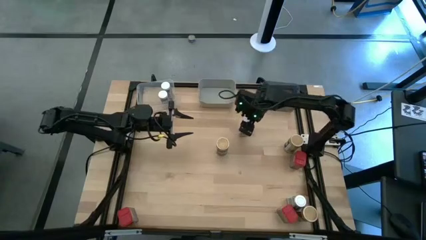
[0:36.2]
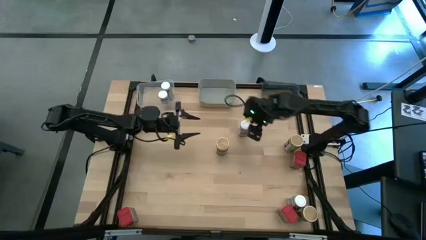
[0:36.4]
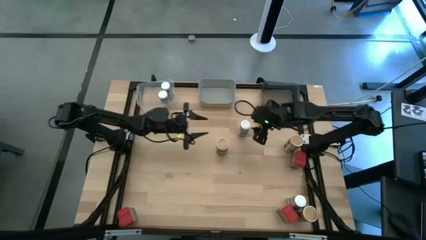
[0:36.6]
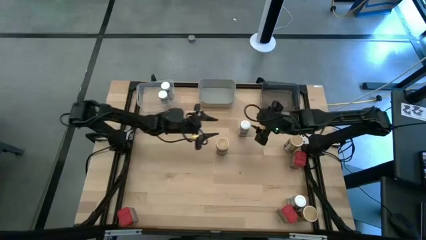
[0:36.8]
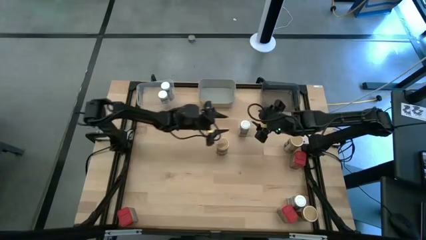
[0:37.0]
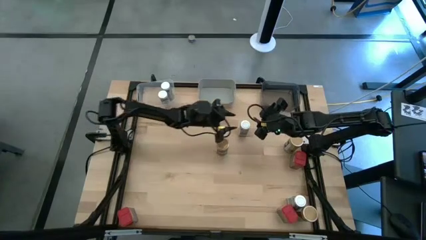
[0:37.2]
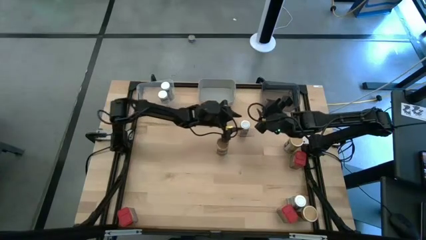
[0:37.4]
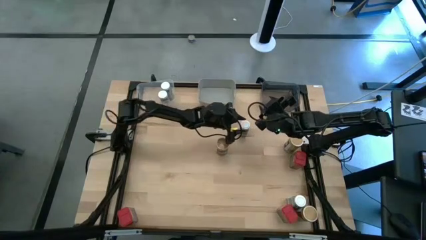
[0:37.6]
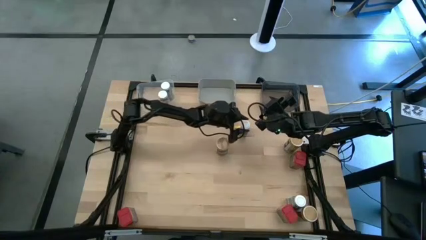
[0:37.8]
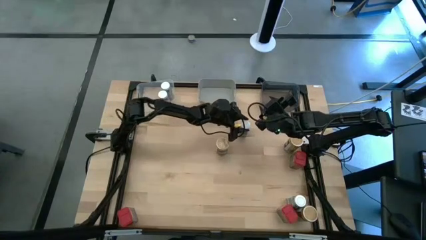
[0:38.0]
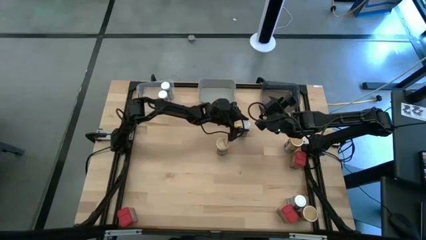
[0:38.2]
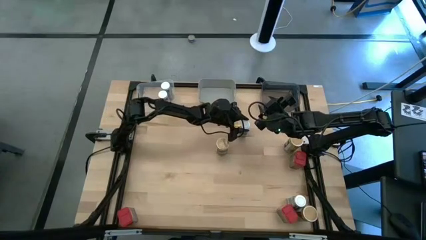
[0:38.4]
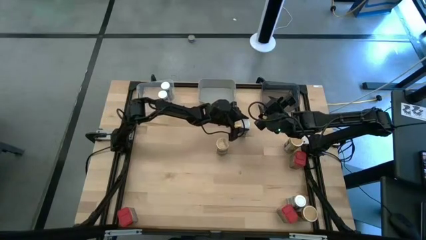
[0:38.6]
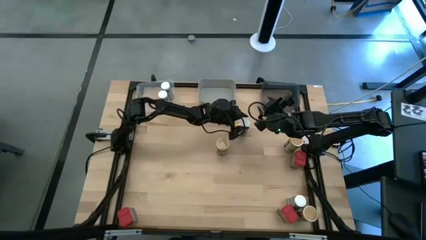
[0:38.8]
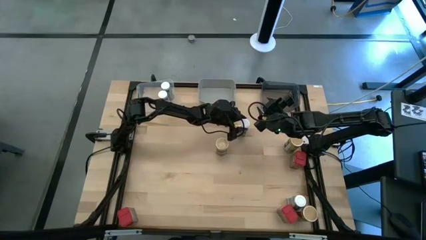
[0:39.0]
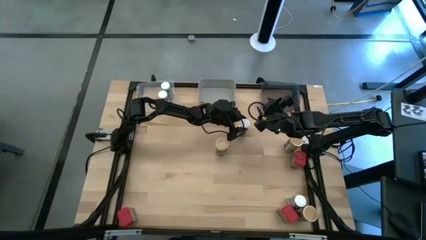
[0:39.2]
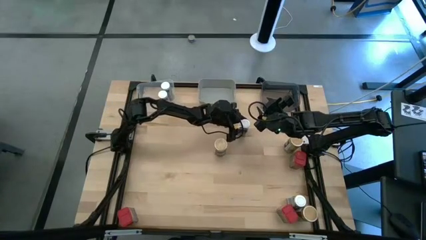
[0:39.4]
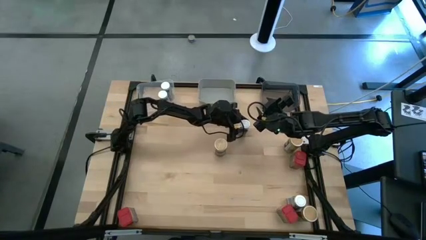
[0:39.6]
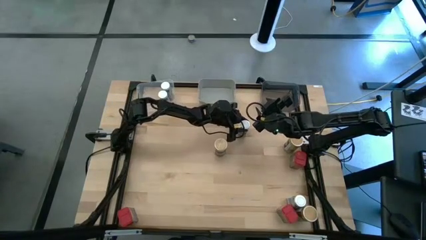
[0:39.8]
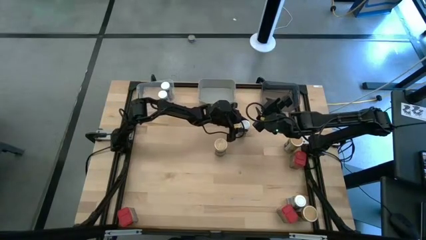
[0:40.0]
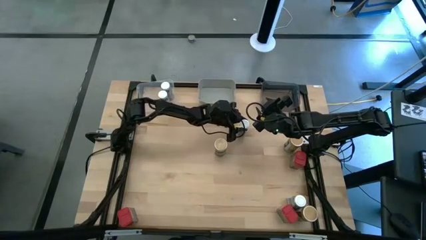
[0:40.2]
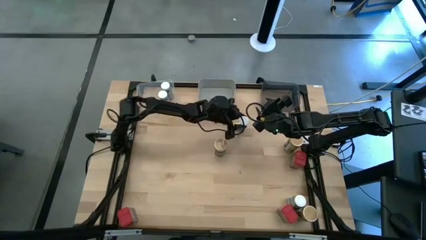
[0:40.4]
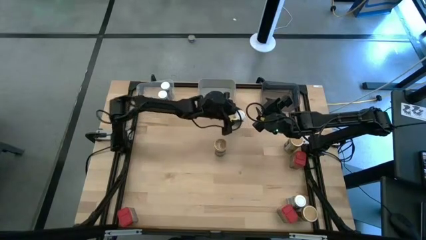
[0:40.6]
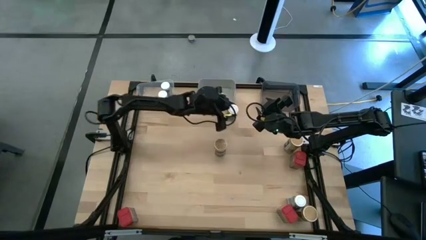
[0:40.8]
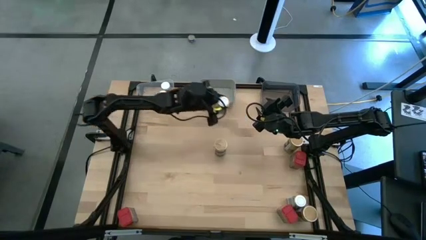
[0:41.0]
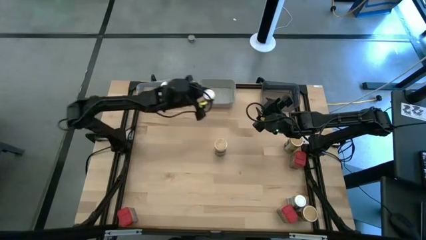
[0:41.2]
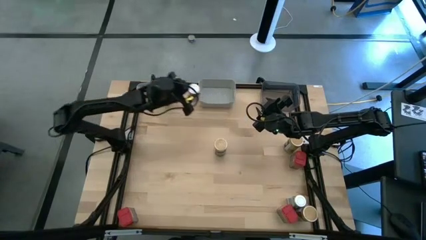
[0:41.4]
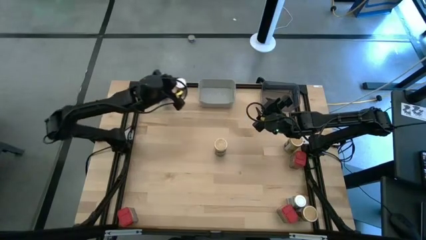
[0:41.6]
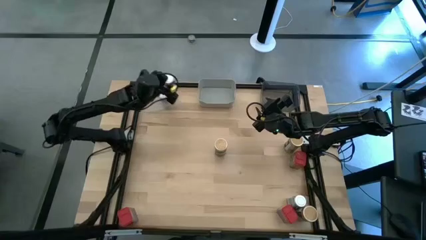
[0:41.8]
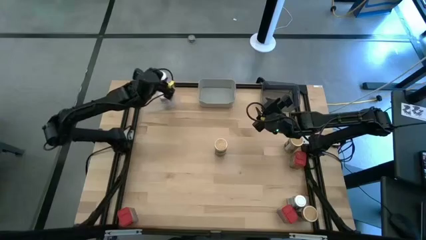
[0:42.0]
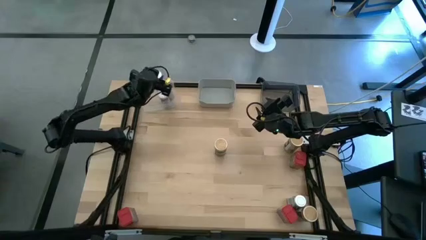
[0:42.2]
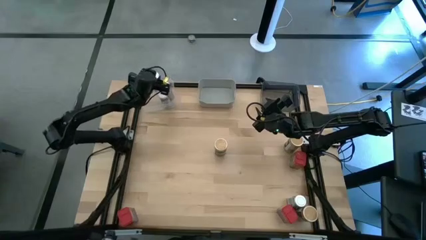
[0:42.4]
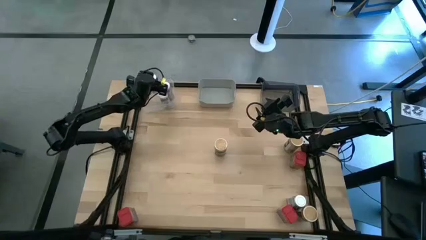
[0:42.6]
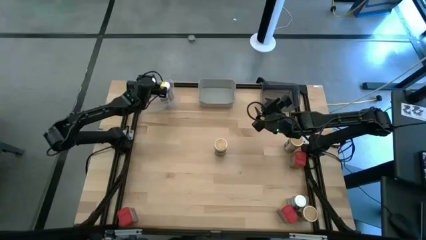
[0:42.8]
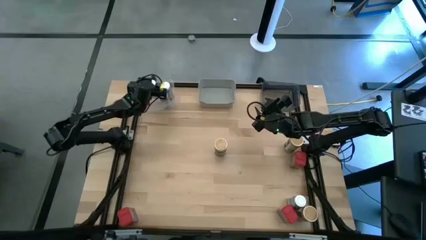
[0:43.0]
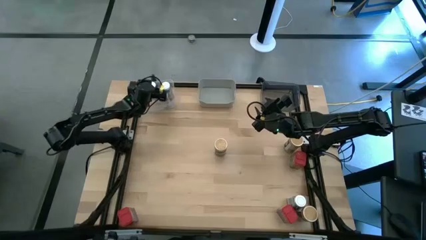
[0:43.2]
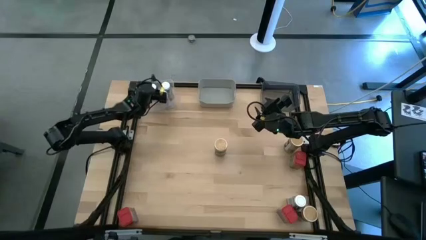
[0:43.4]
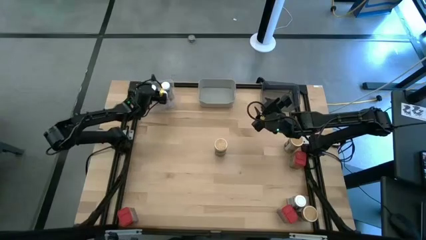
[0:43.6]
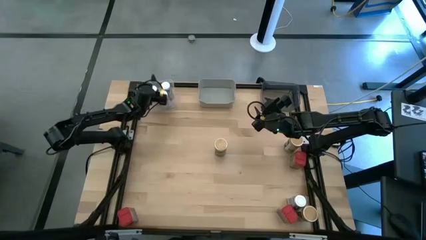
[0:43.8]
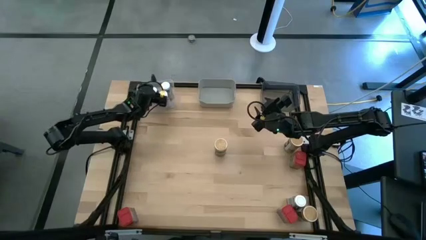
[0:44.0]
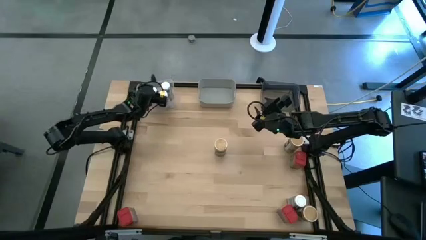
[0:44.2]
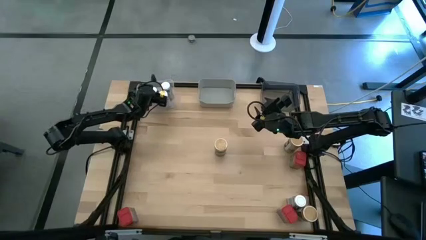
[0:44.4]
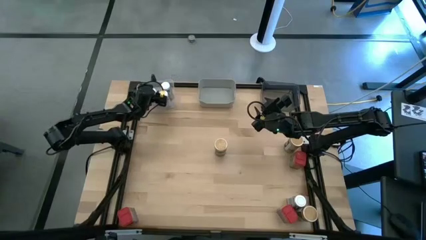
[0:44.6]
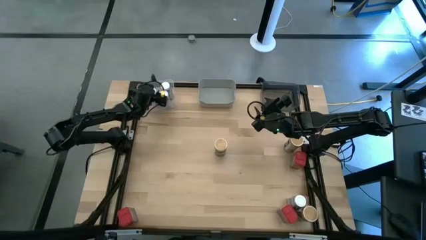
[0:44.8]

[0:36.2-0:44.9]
Task: Sort spices by type
Put the white seasoning bottle into the transparent bin

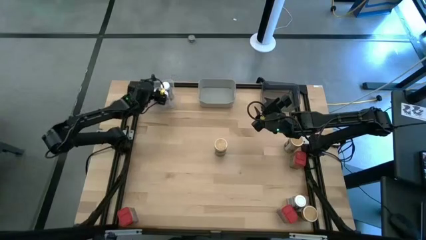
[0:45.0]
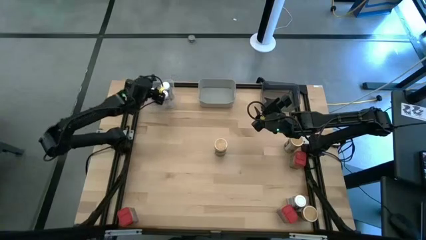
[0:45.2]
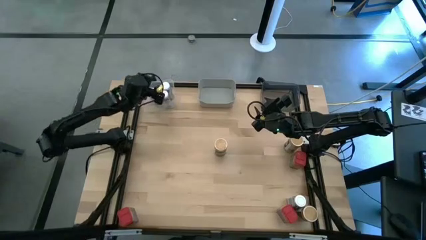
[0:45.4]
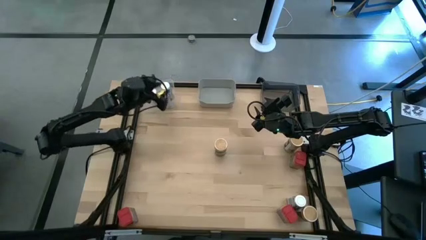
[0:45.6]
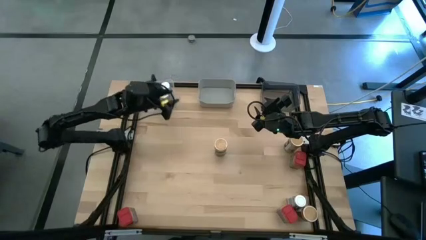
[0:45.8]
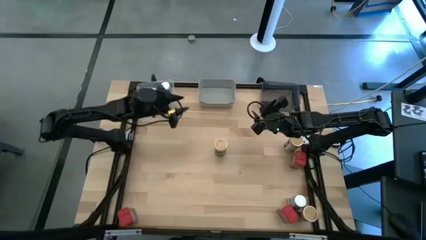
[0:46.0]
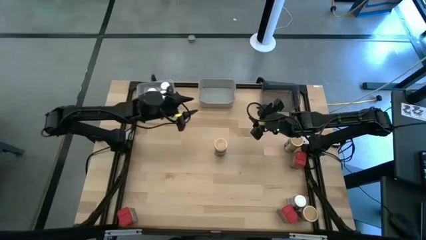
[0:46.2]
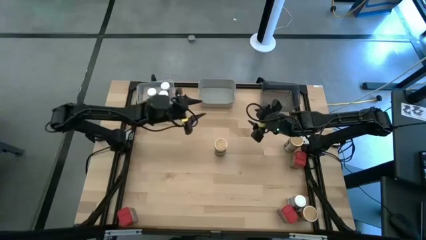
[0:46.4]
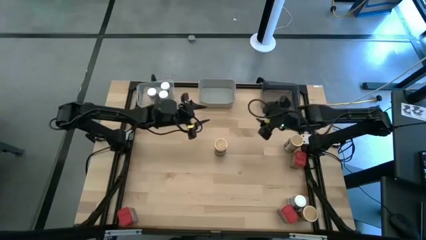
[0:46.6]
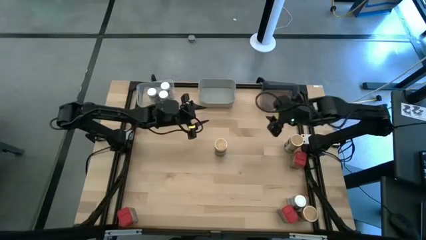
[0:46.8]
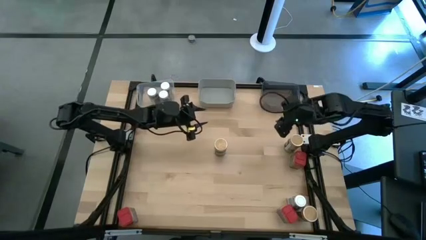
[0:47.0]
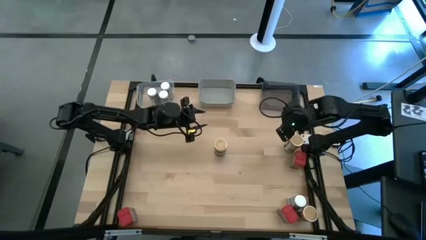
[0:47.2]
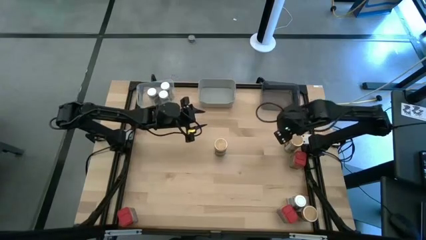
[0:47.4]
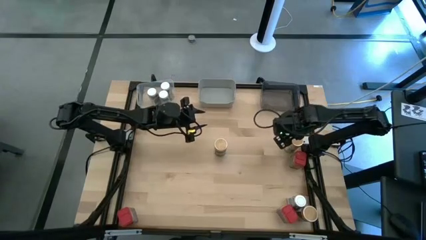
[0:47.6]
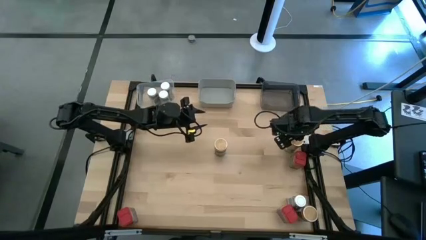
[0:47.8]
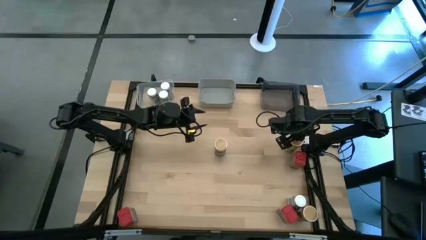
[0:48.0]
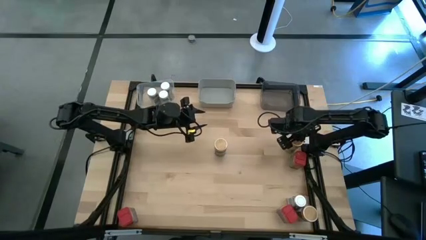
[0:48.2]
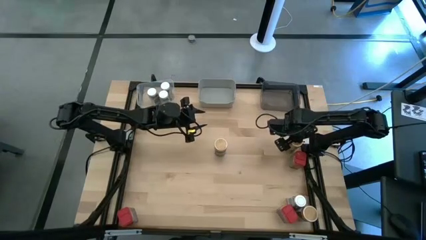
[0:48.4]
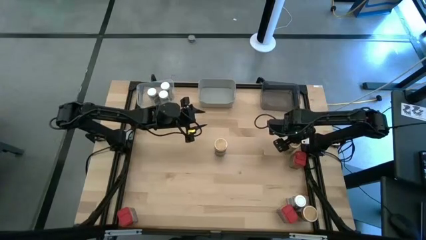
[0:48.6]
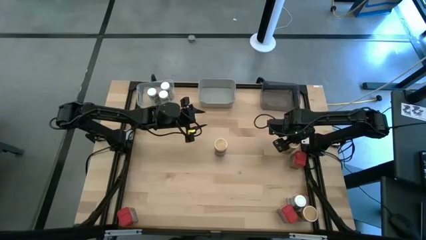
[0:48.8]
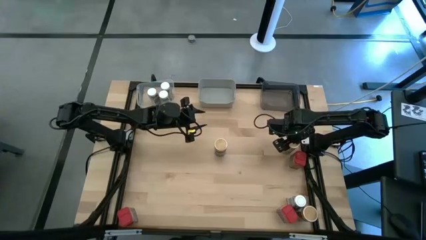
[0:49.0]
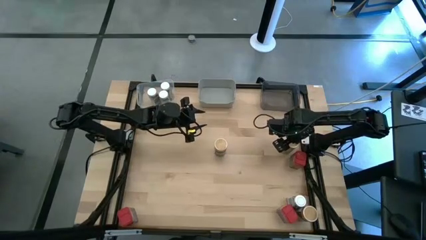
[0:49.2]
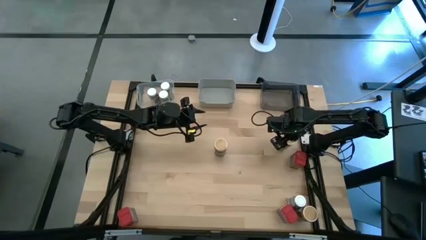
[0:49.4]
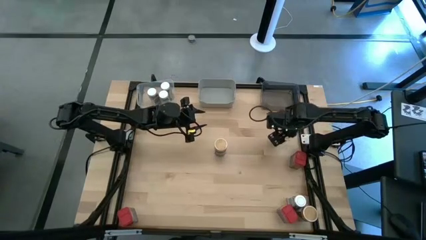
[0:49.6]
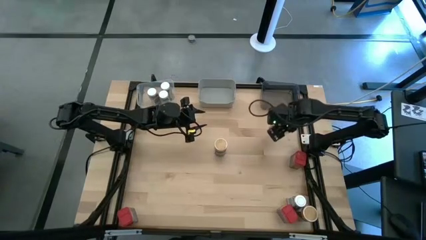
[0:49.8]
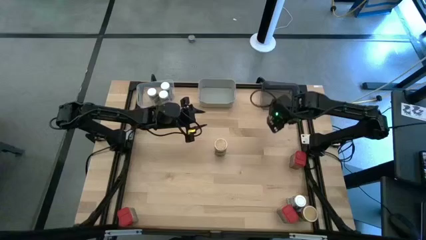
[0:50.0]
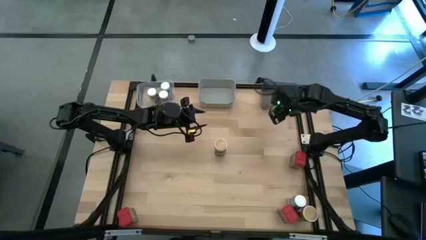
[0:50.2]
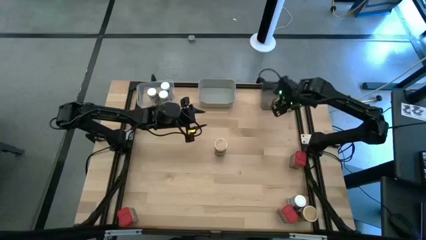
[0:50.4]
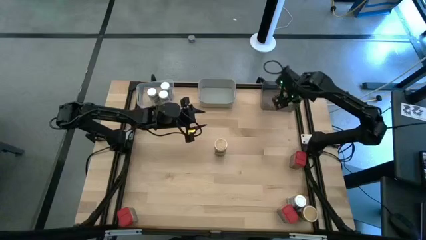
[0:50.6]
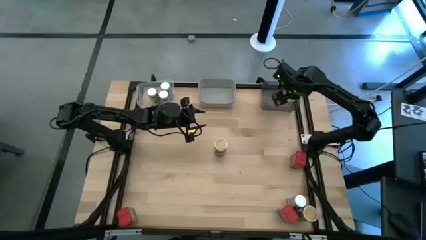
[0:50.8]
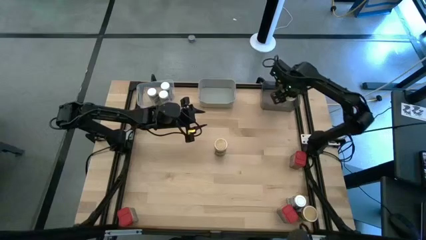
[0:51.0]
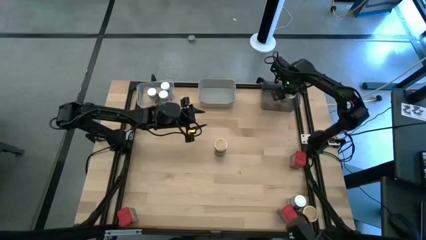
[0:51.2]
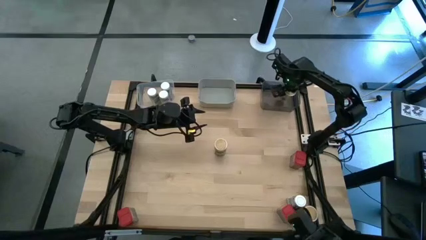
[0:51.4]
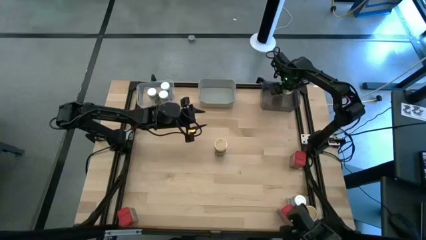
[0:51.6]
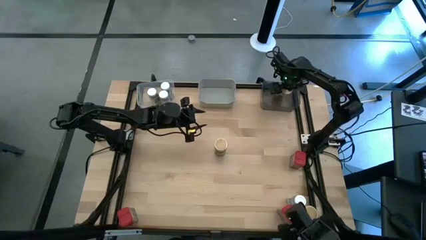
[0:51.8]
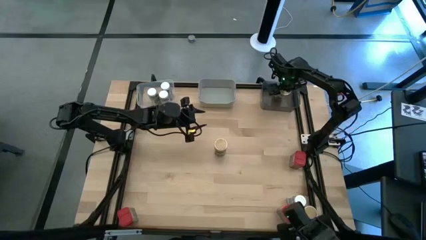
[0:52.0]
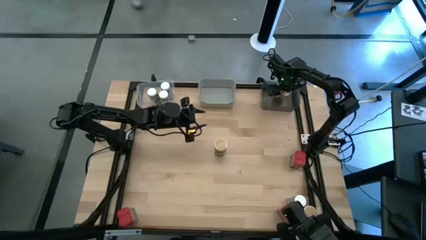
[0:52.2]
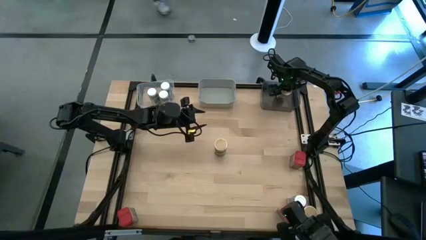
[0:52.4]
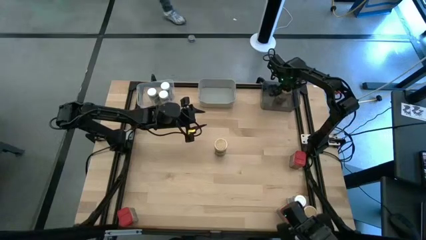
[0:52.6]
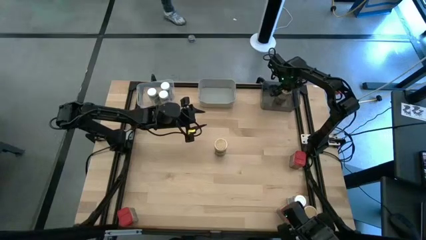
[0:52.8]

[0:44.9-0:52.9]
Put the gold seasoning bottle into the black bin
